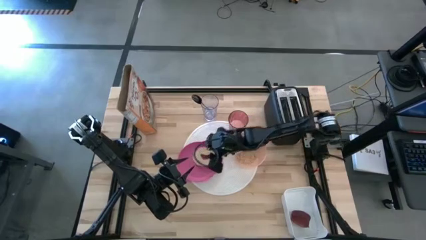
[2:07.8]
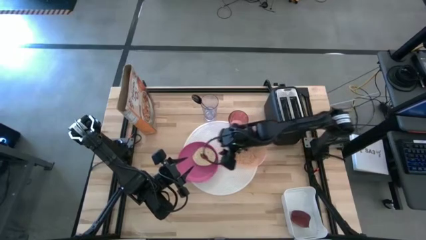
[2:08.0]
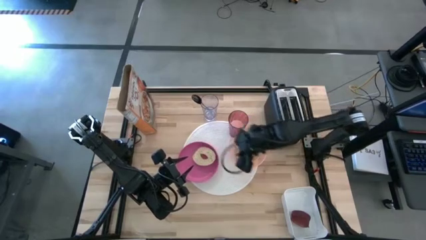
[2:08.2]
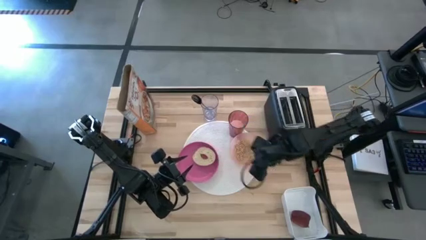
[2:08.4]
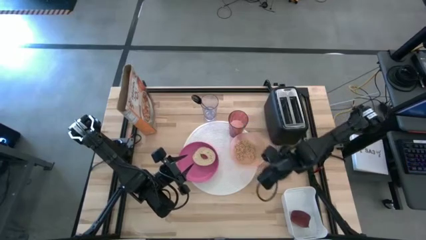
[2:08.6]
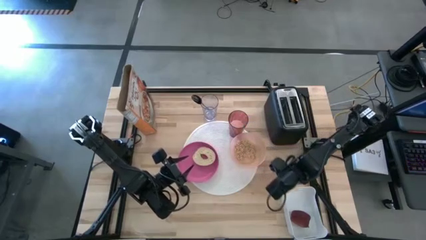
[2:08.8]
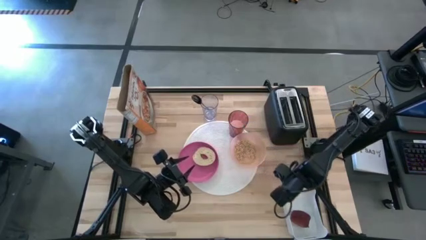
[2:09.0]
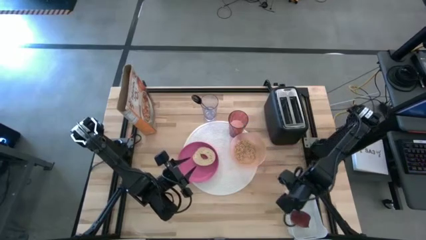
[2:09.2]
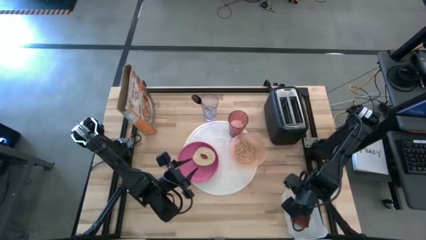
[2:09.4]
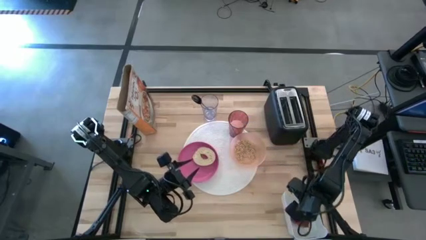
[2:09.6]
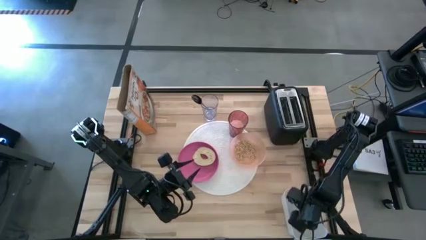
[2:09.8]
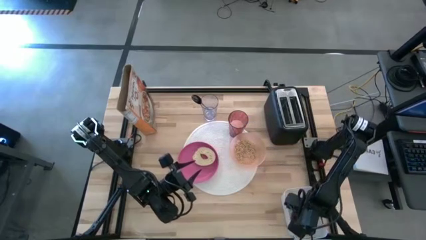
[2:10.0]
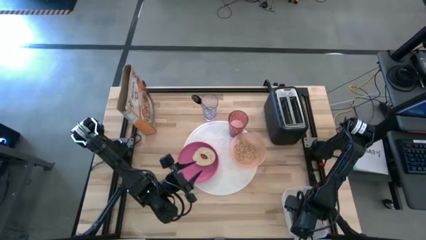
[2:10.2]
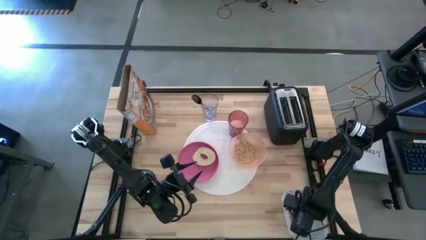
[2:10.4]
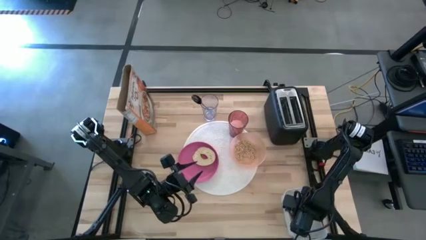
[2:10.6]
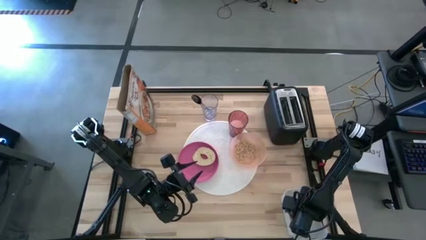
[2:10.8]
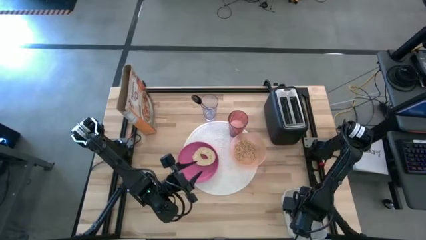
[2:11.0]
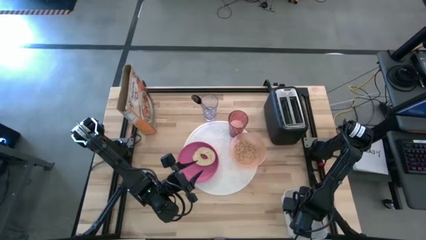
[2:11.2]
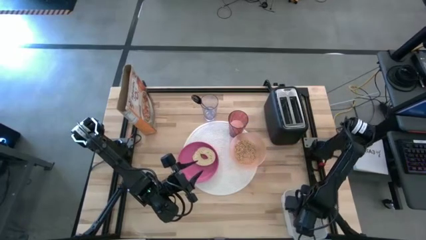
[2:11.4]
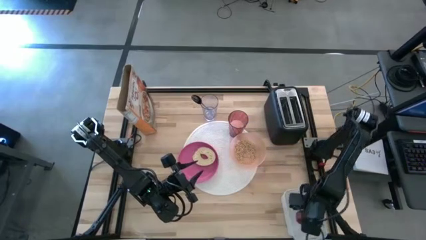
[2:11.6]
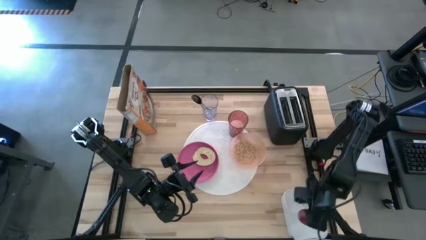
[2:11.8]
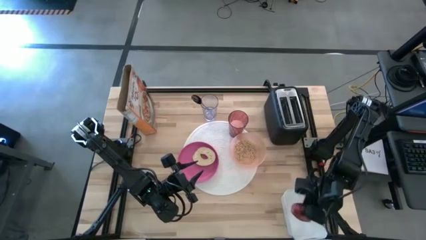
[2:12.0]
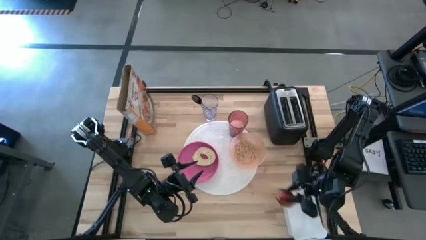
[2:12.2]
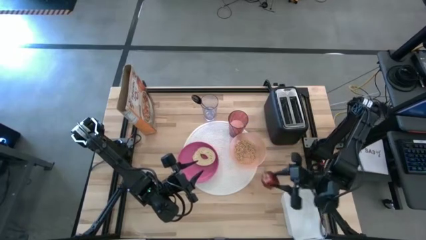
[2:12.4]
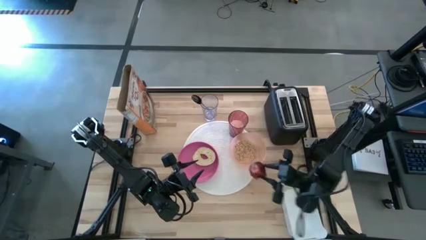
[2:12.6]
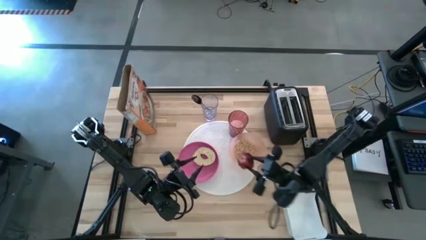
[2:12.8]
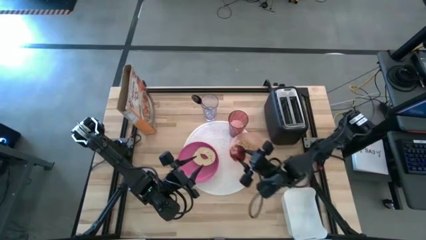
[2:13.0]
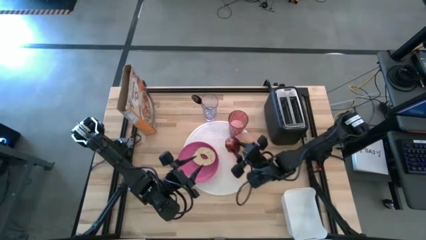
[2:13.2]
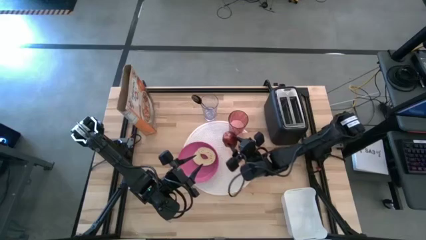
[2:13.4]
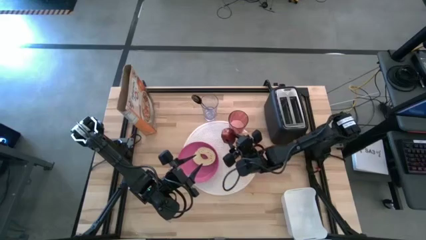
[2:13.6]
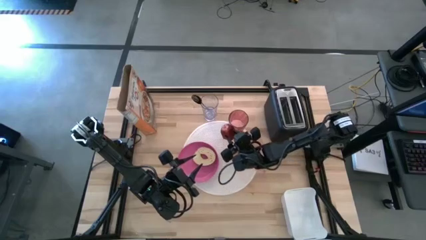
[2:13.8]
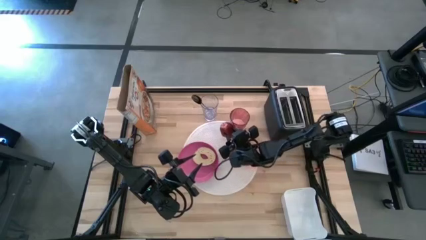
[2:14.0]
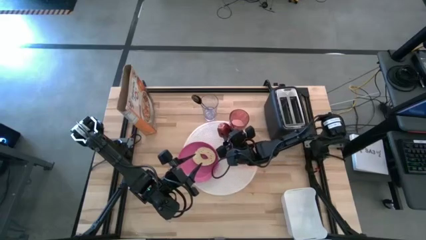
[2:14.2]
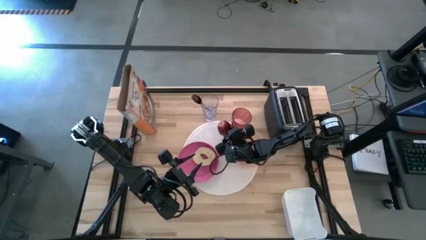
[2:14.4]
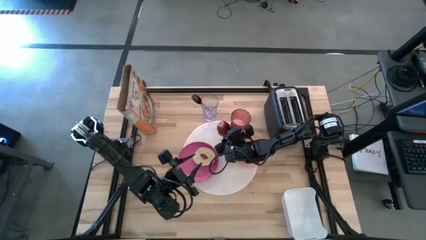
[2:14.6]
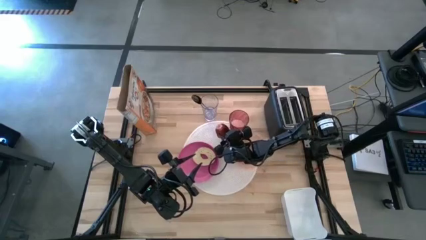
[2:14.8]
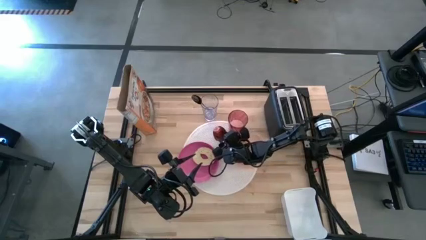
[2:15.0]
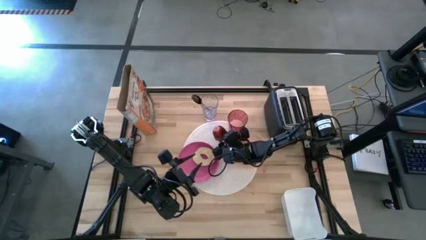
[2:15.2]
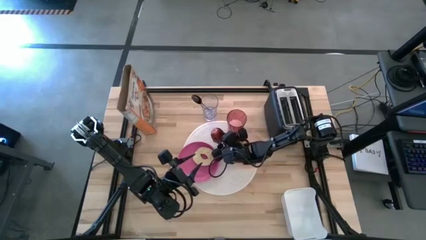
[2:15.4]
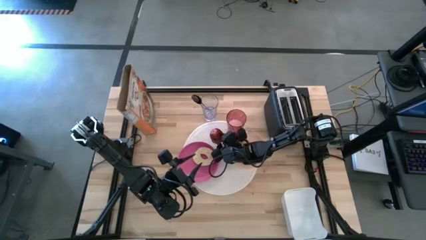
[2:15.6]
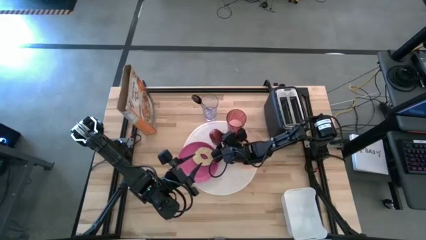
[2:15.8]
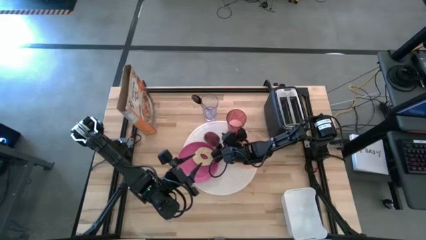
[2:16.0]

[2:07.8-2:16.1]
Task: Arrange a breakfast setting
Put the red apple on the center of the white place mat

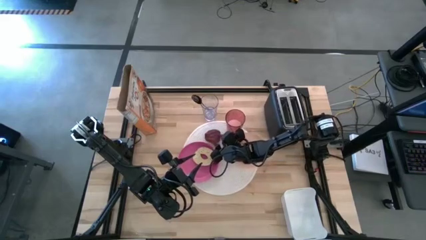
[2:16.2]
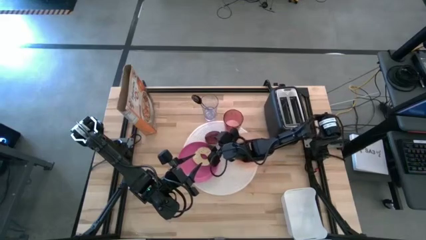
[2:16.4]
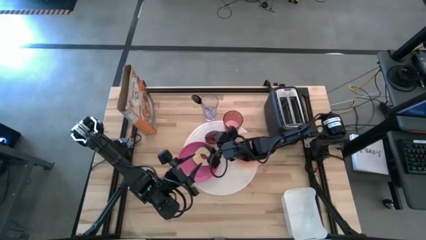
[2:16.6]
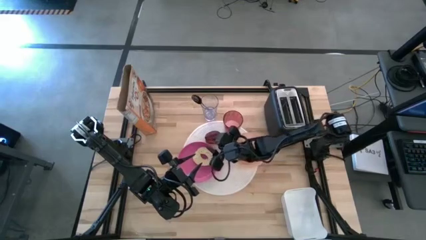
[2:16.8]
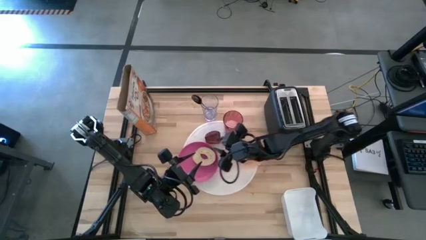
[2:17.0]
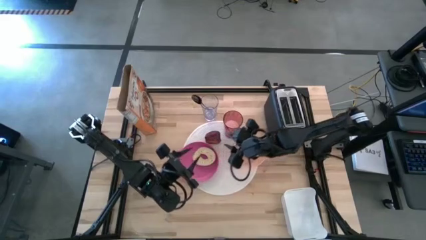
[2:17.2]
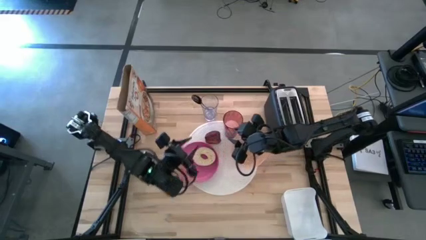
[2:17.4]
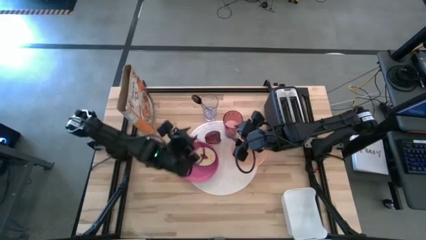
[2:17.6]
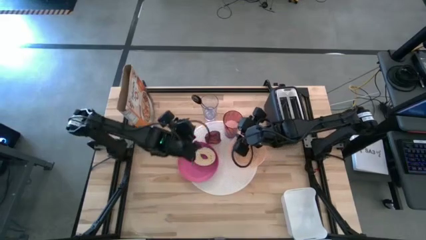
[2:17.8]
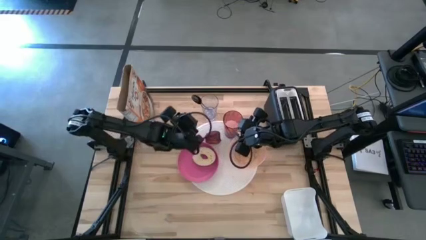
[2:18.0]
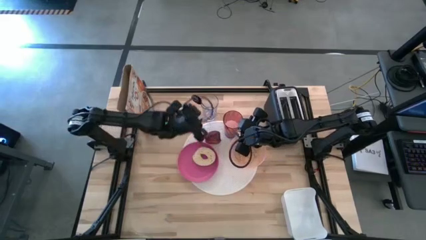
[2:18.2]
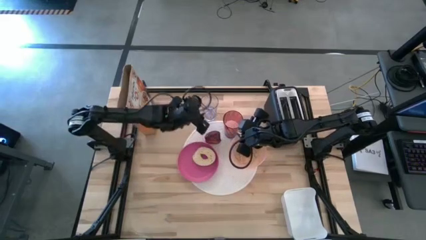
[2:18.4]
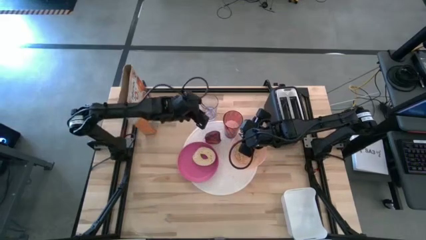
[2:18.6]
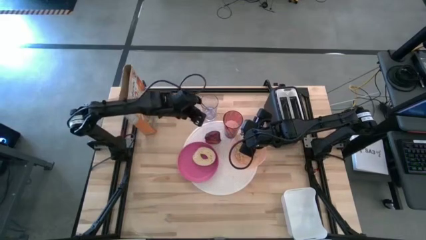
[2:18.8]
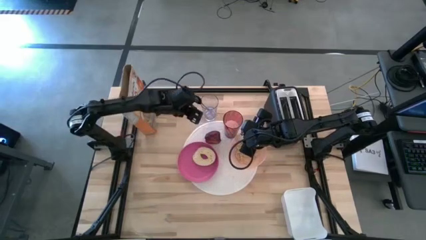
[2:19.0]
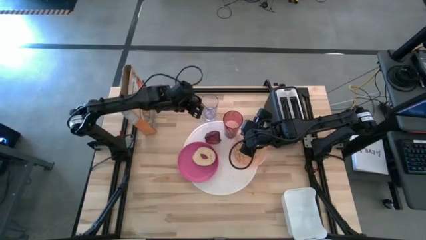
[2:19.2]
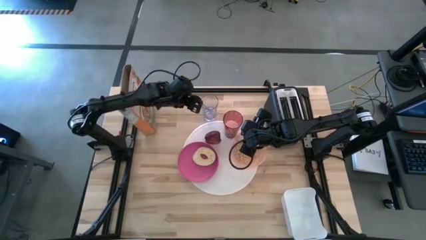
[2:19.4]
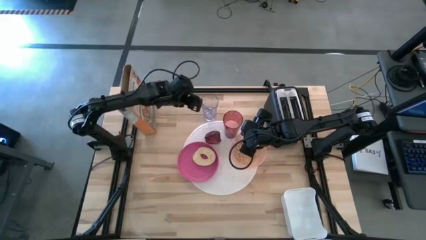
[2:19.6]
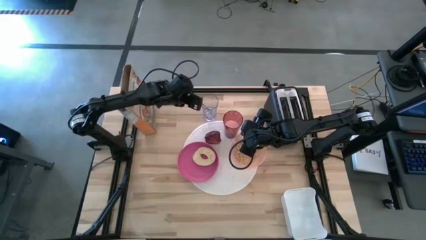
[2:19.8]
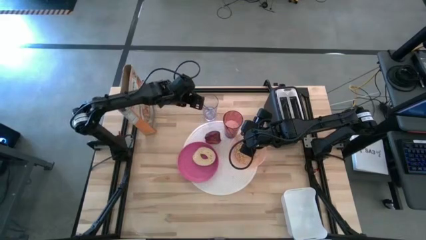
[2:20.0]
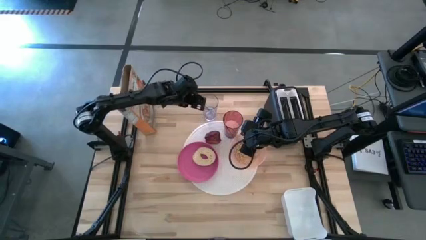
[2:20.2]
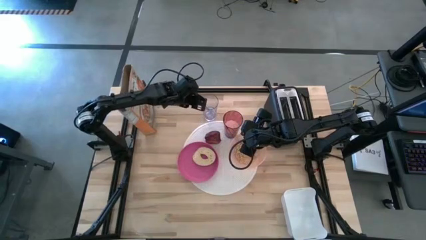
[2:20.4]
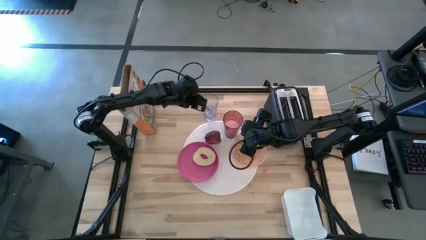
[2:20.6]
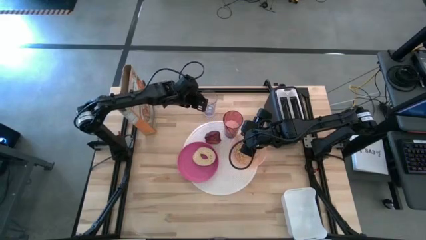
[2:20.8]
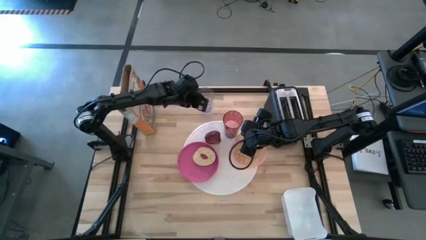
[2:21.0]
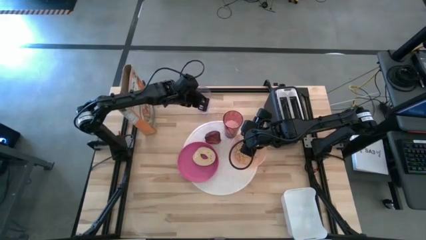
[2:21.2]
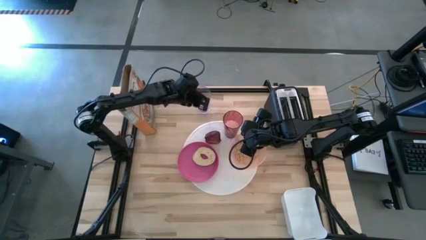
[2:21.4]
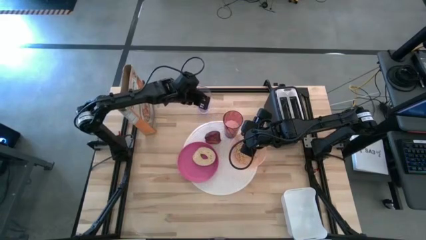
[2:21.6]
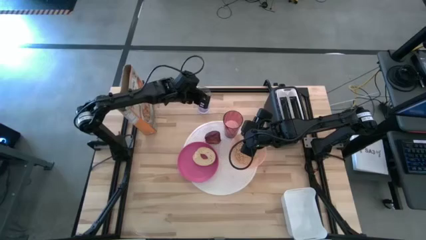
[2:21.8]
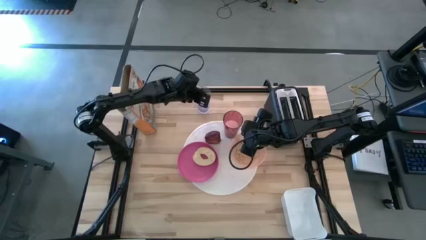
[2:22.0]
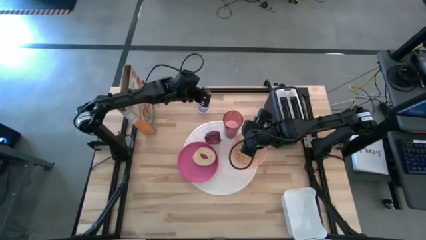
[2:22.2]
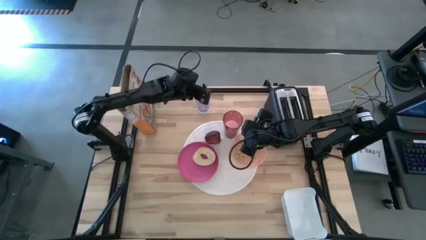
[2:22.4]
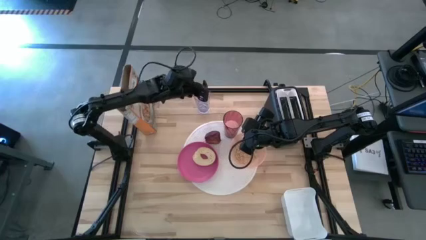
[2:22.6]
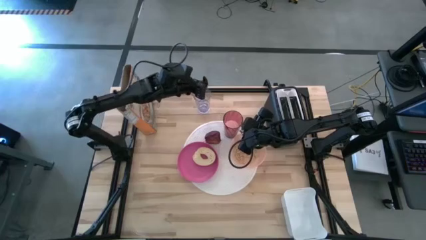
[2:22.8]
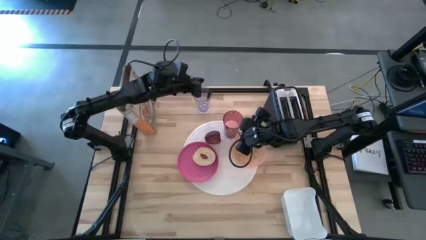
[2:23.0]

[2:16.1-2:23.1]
Put the blue spoon on the right side of the white place mat
